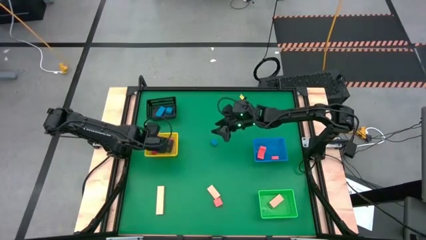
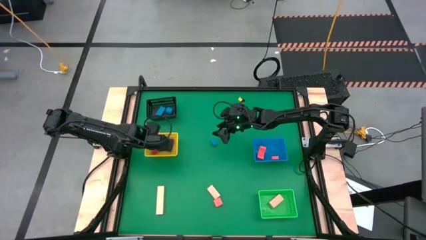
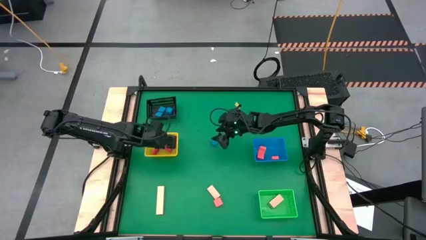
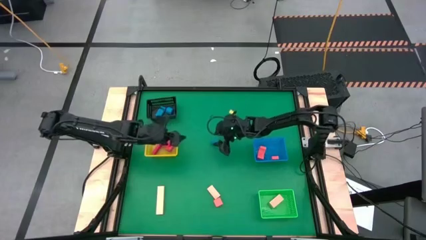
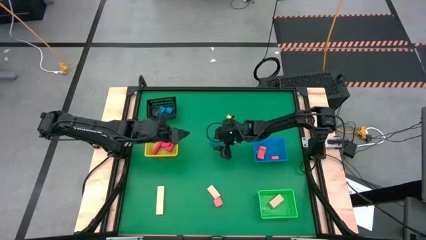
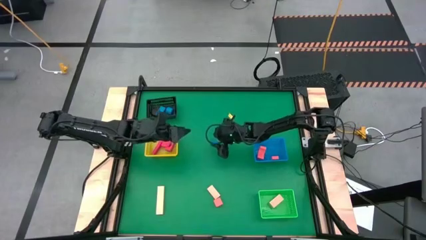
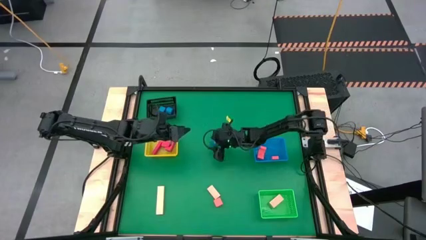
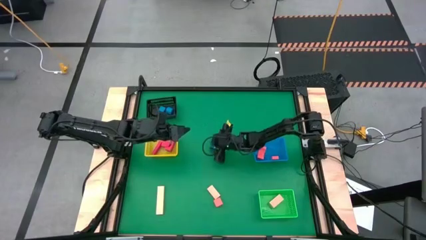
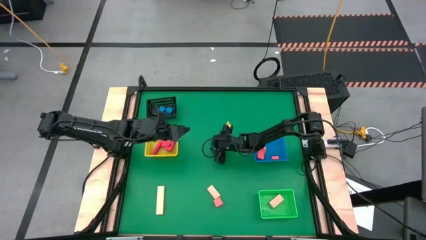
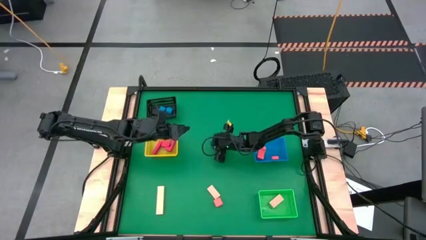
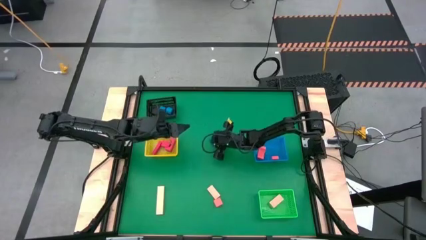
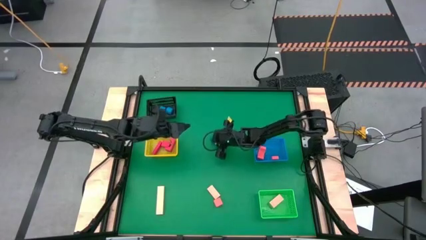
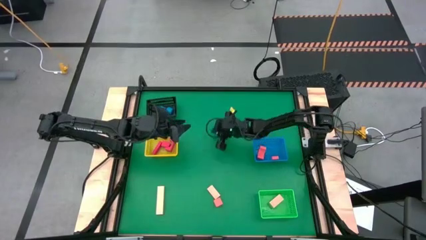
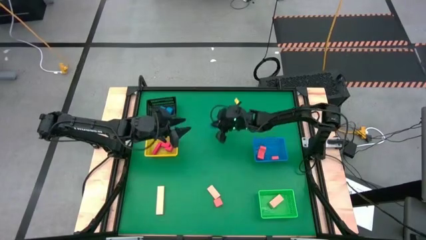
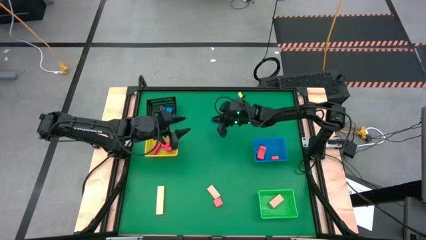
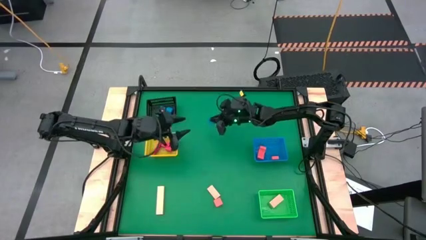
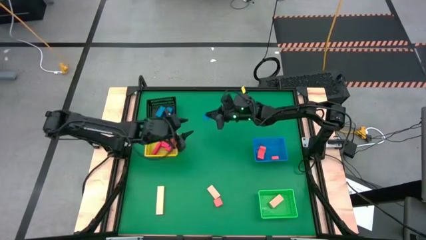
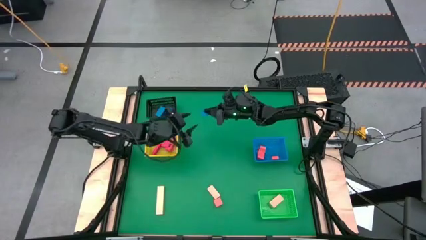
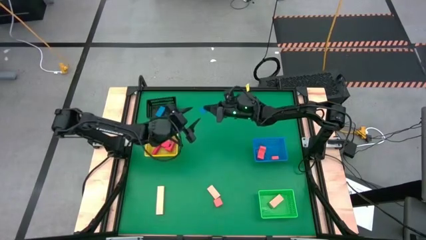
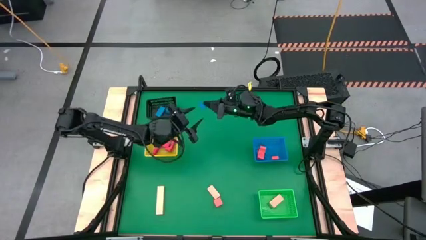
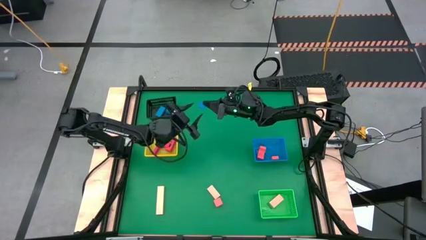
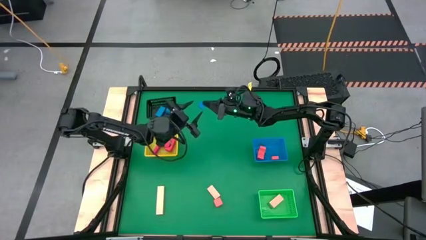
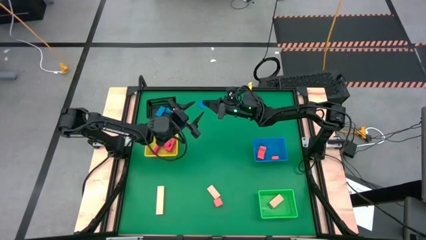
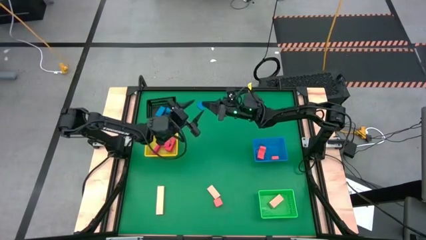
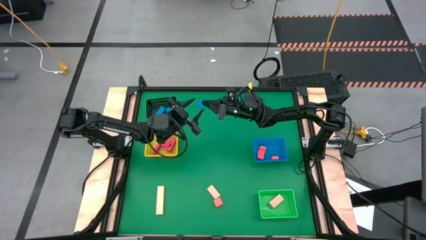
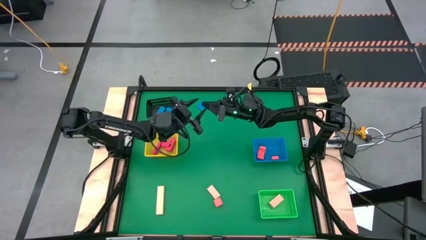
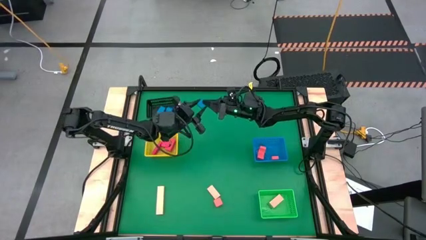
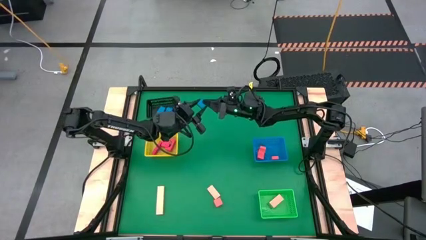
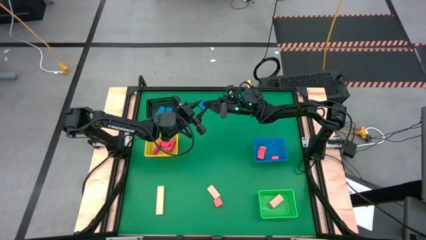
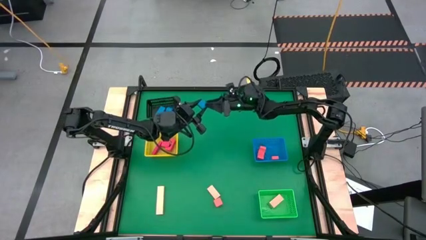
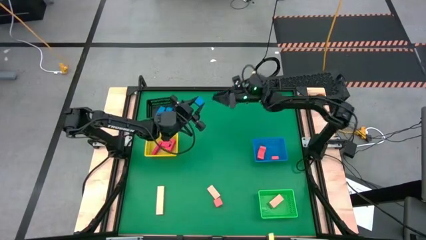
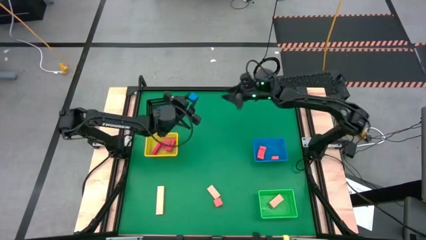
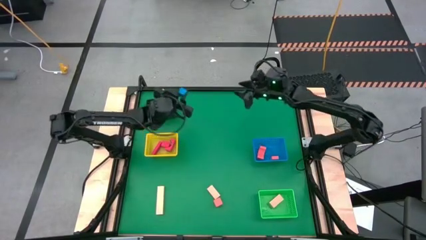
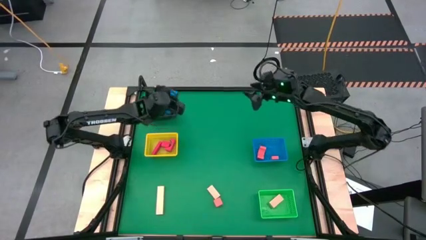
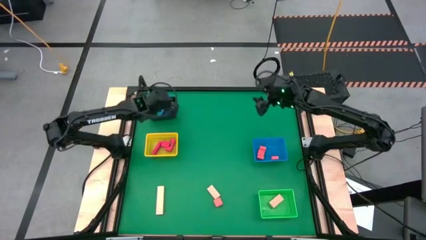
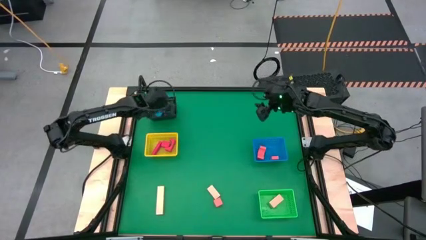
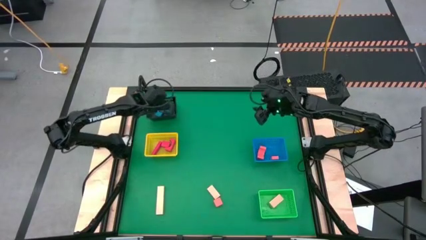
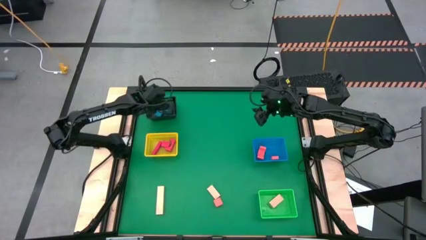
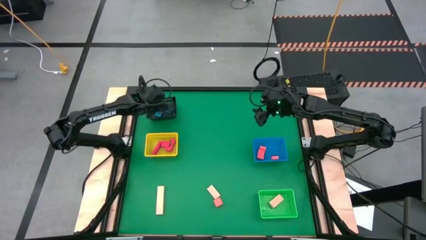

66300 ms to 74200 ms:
Task: Sort & place blocks by color
Put the blue block into the black bin

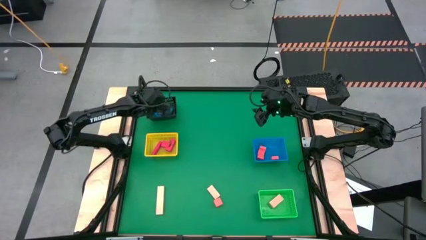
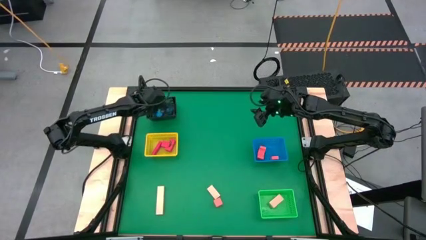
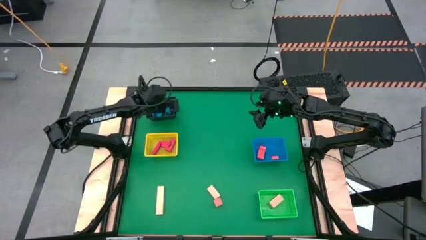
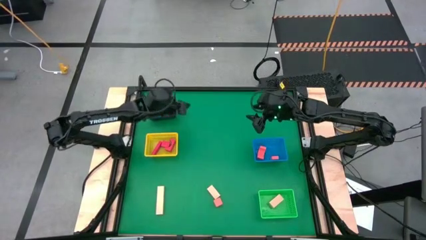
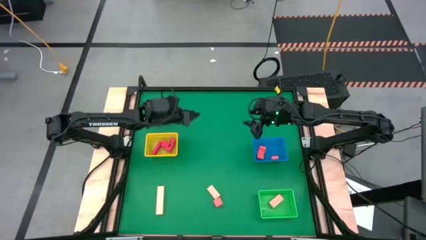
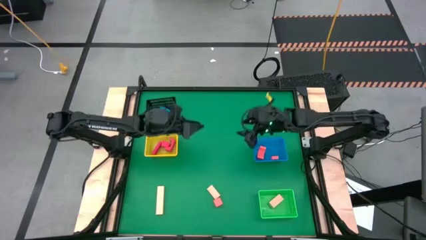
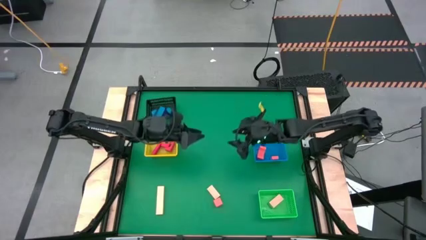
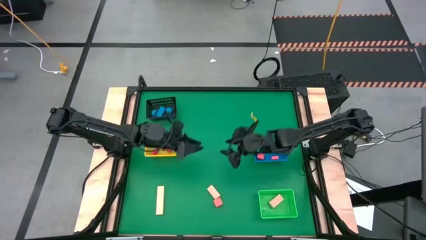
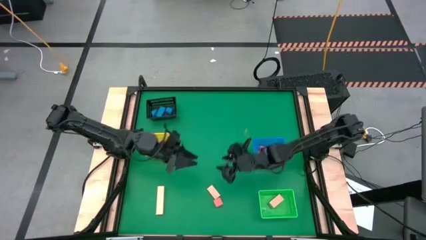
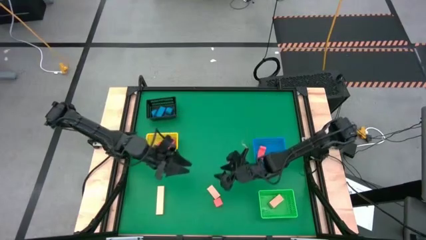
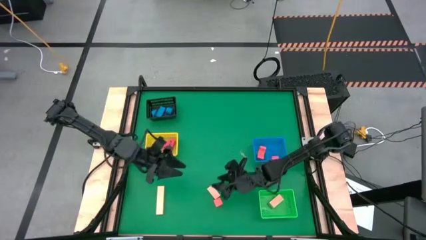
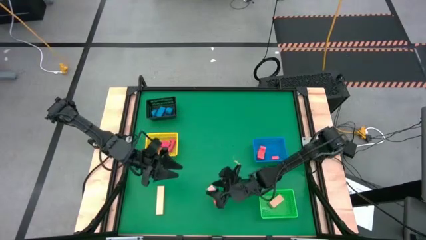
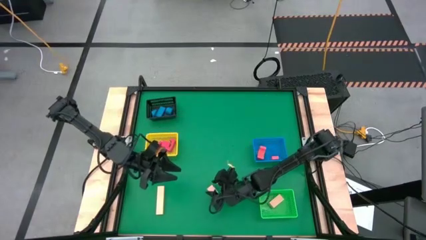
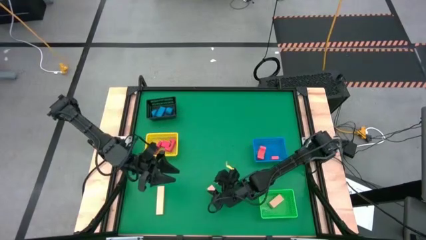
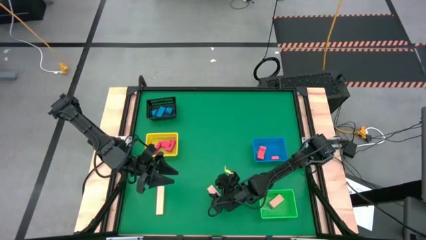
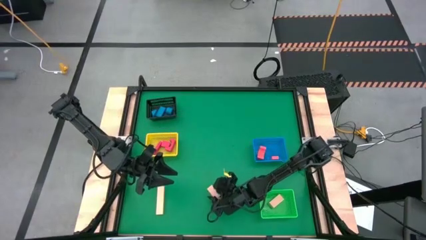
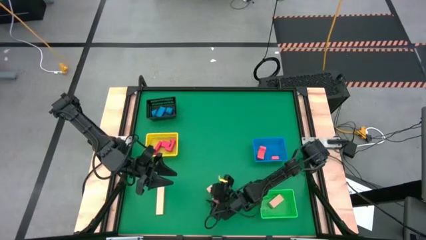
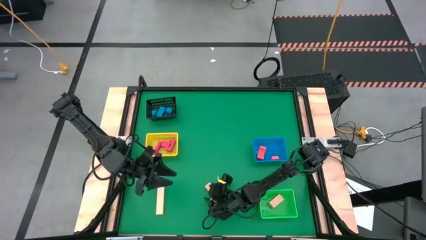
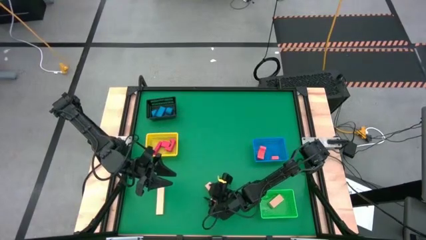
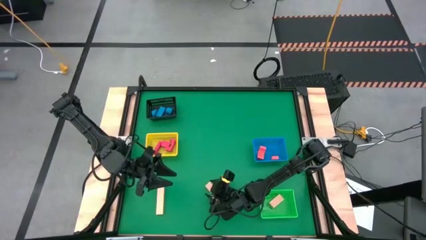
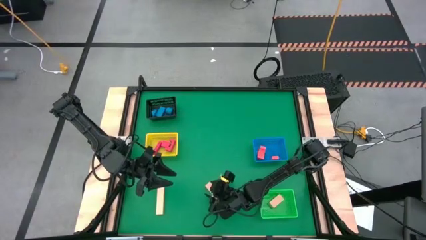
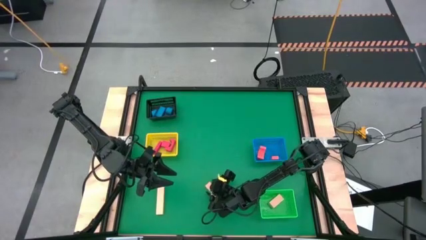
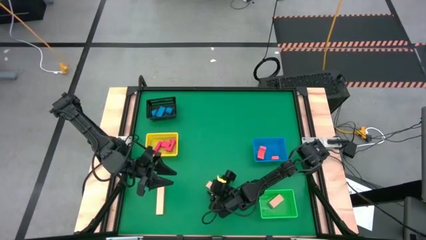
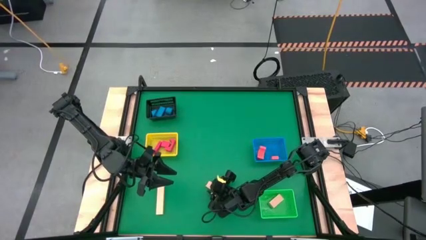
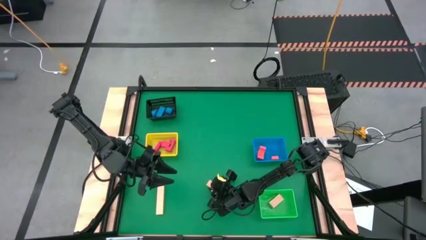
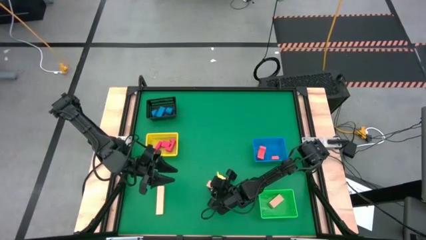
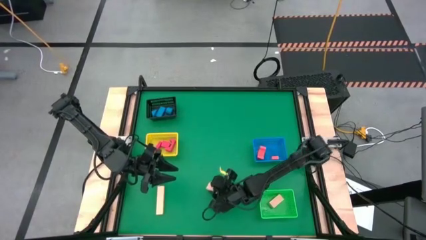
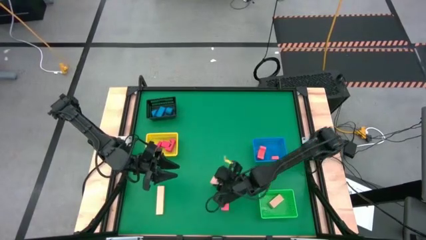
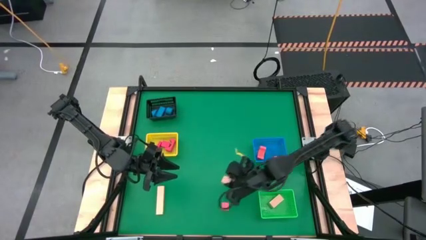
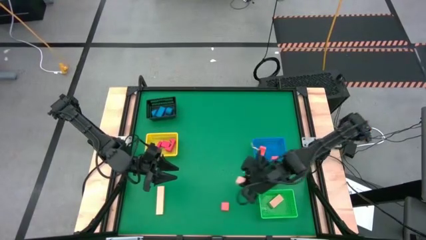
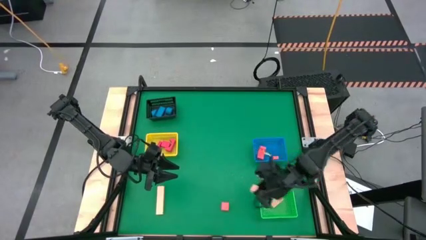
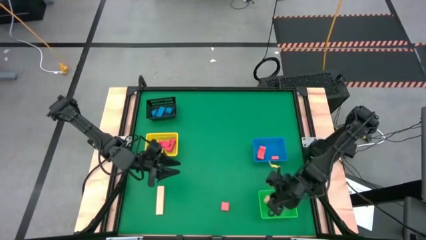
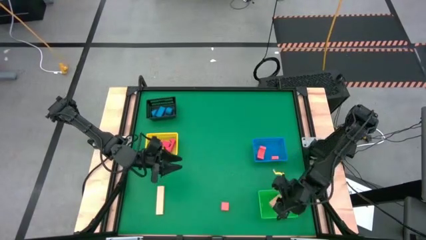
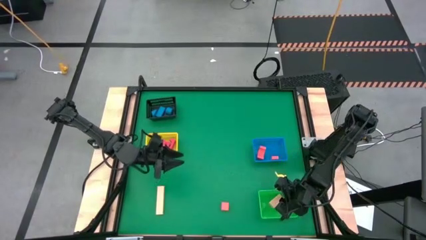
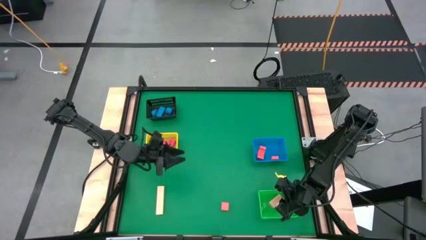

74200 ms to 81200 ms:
Put the right brown block into the green bin
